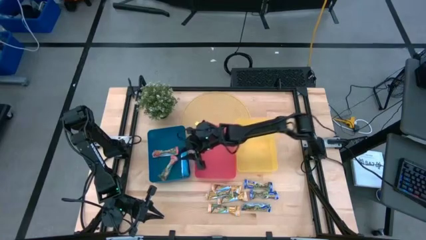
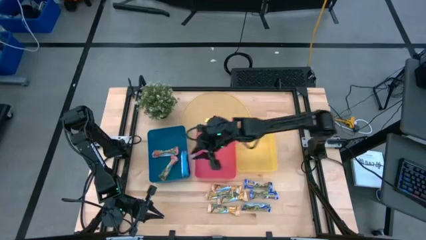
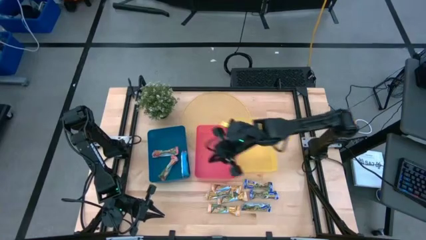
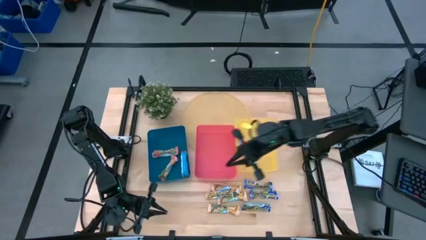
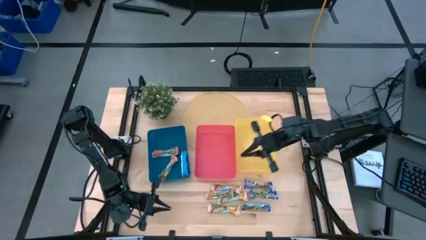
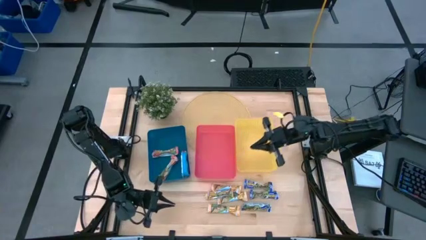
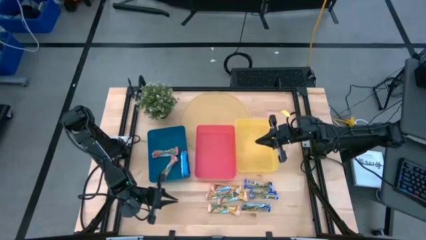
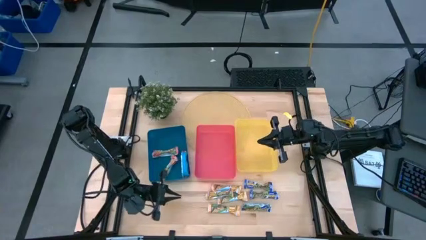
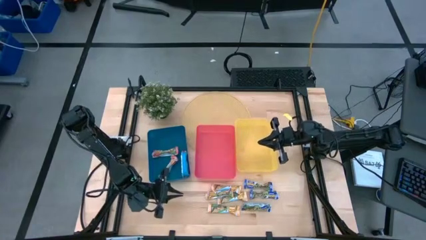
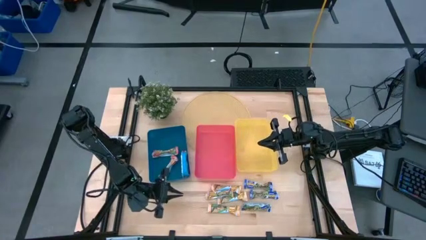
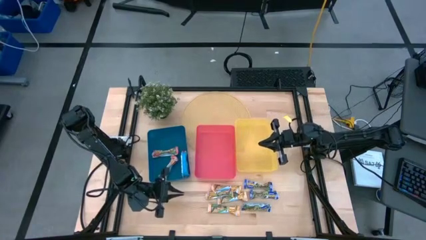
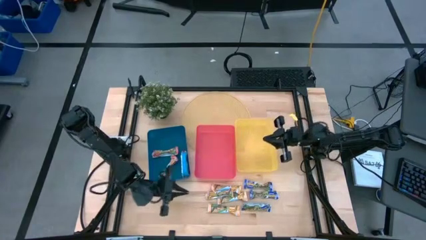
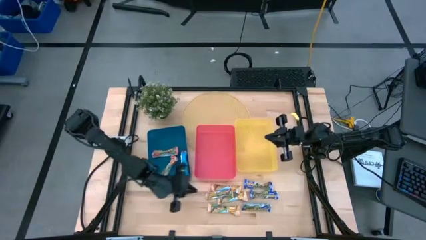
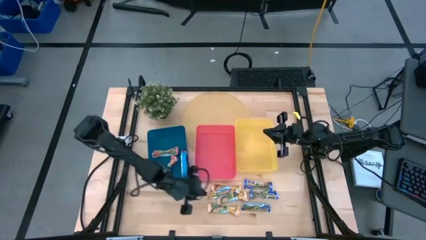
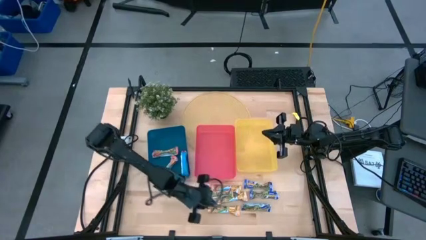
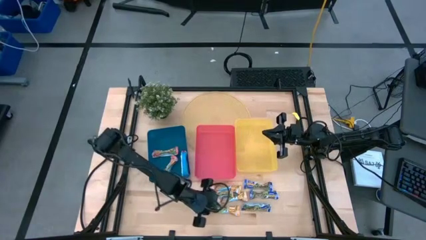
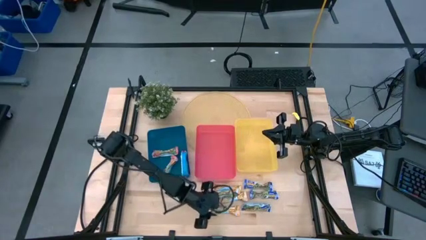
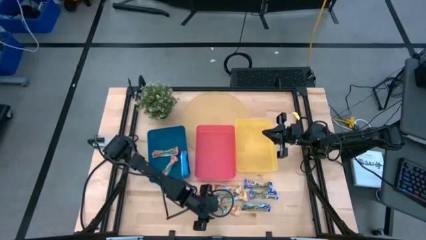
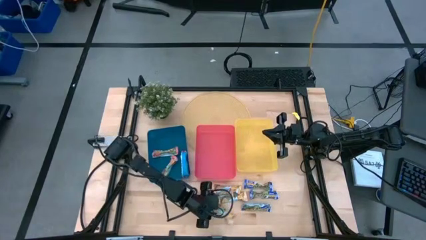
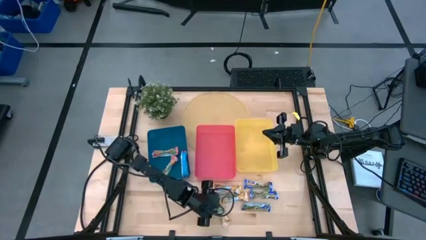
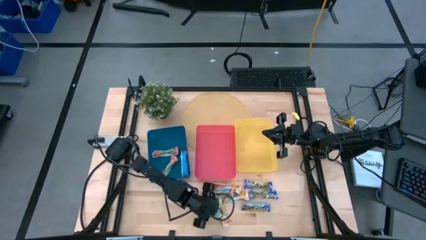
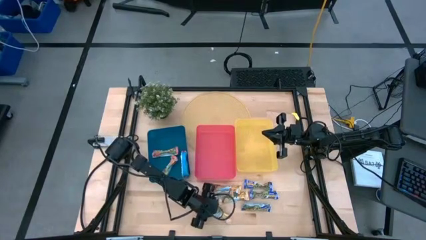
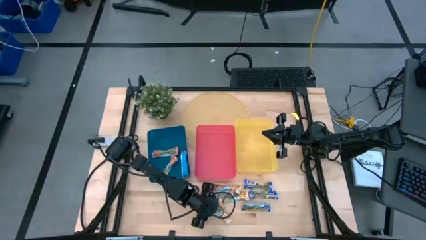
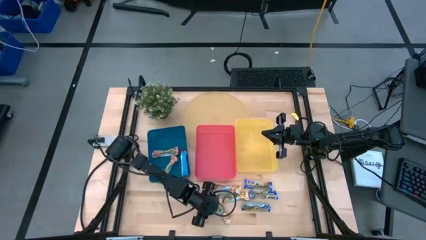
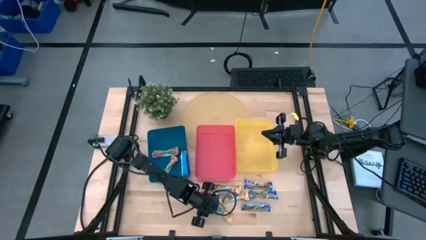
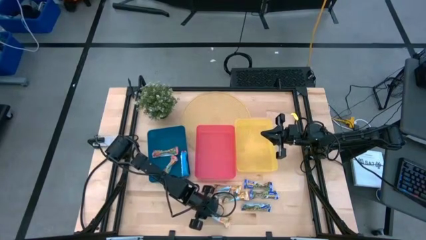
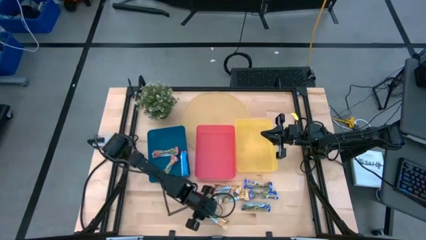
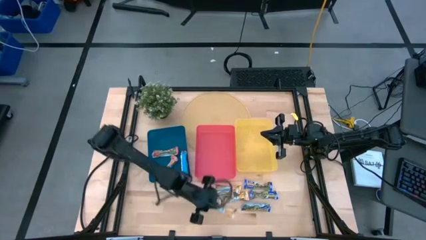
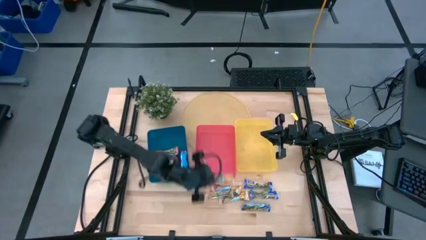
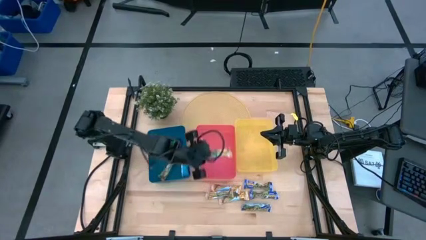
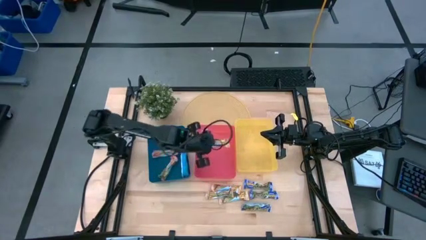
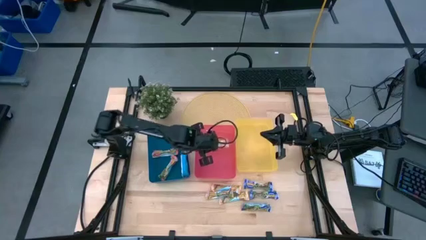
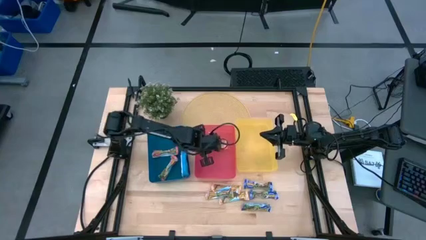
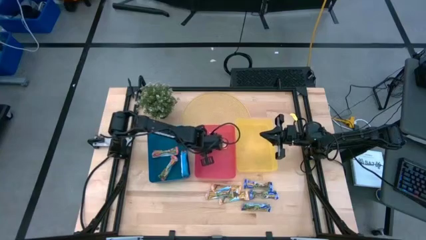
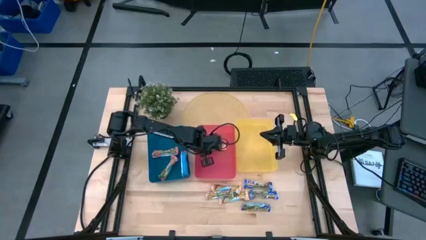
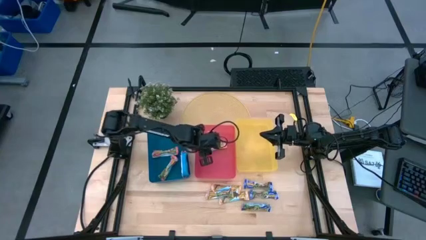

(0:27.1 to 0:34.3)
Task: Pick and place Granola Bars by type
Put the yellow granola bar into the pink bin

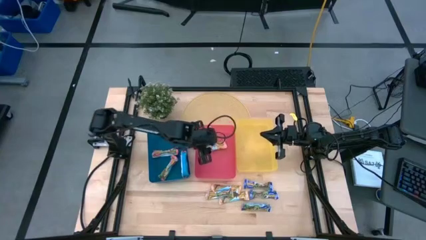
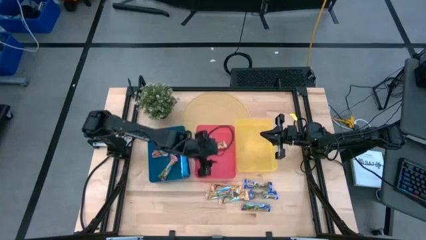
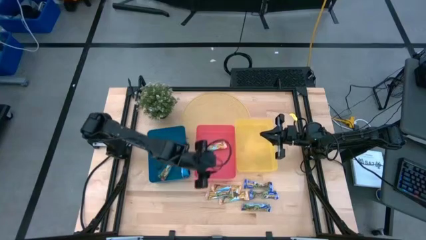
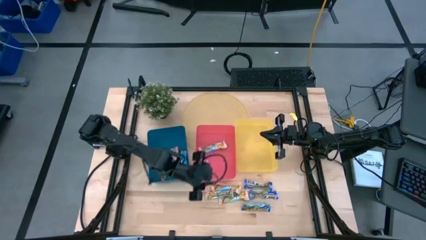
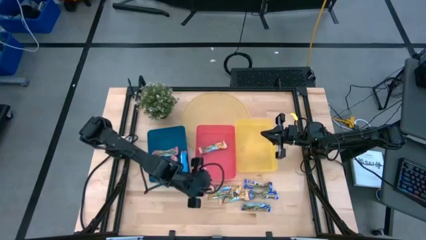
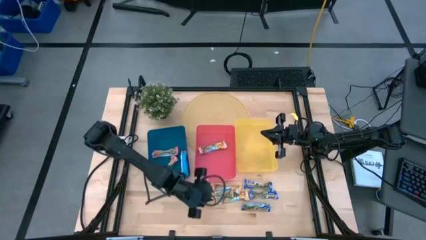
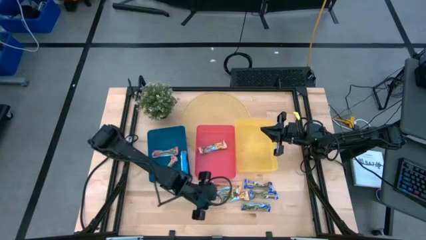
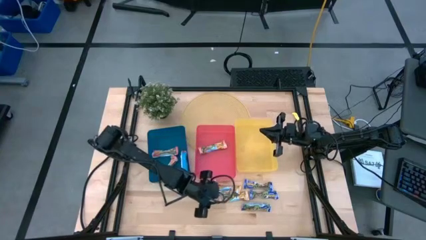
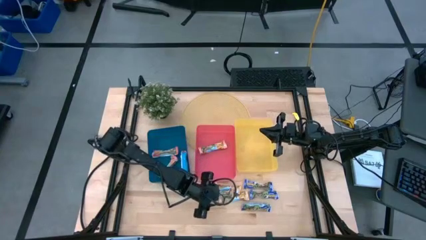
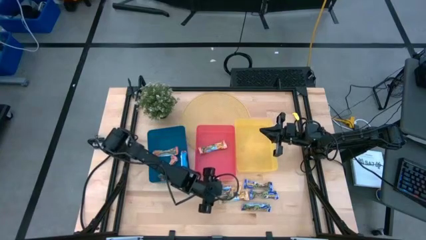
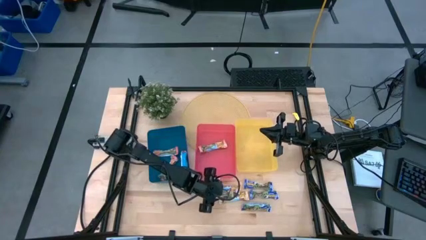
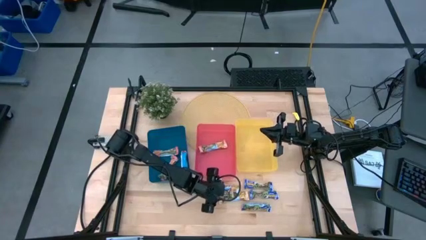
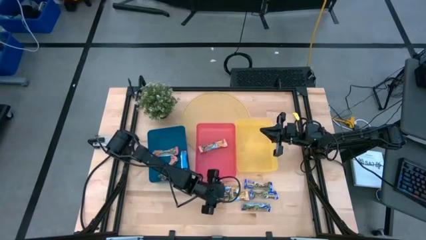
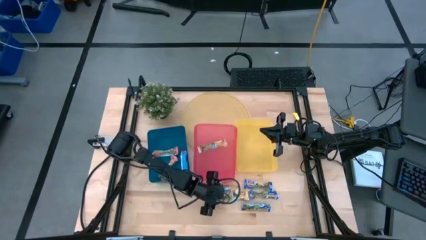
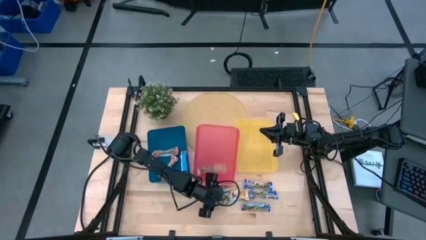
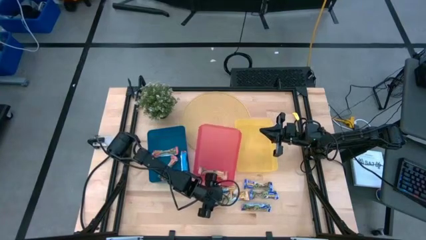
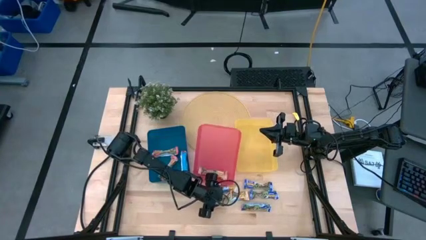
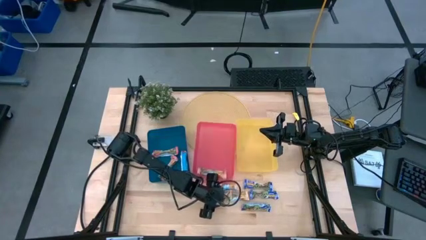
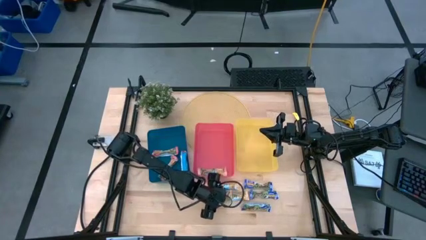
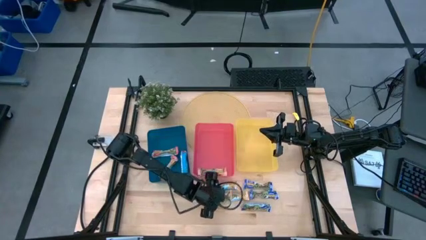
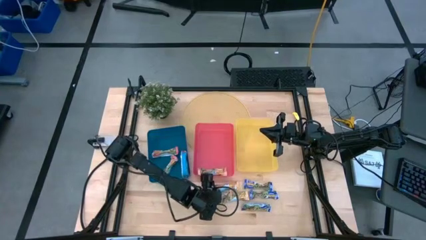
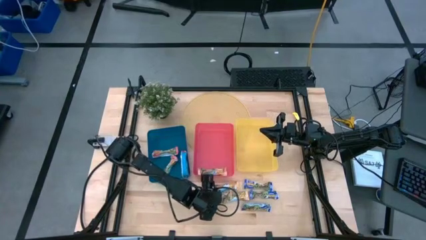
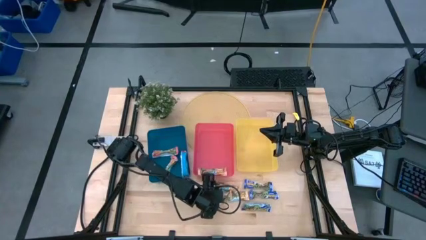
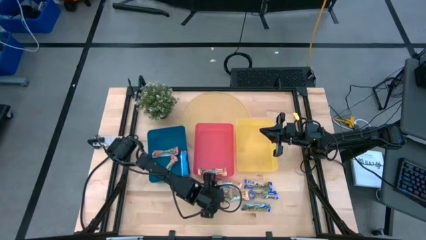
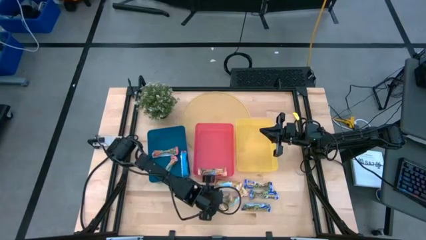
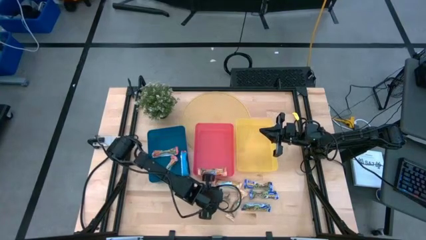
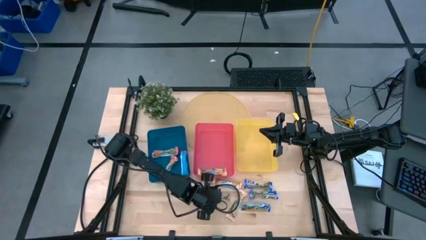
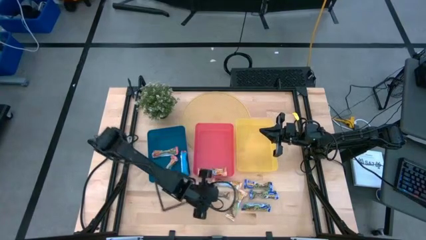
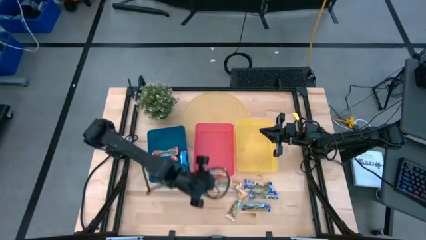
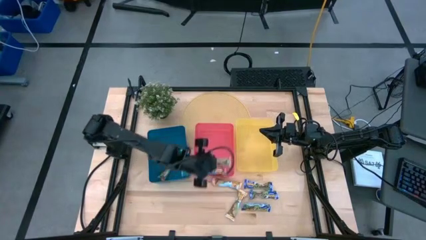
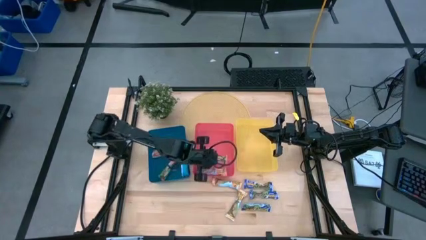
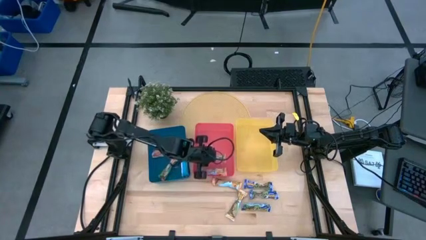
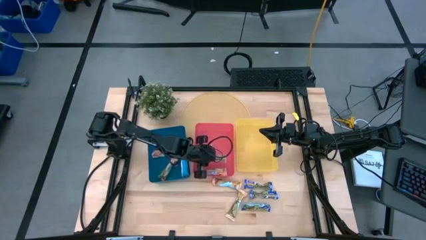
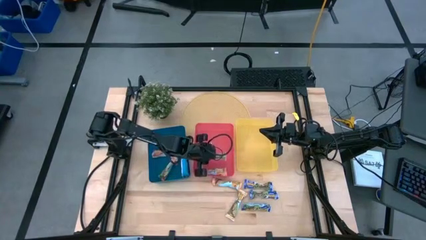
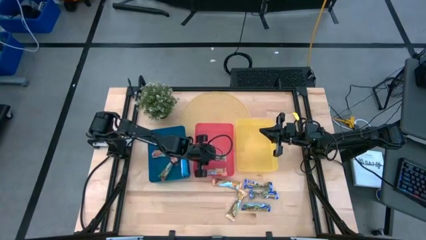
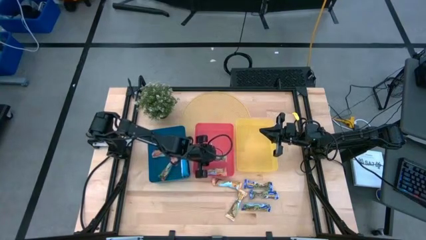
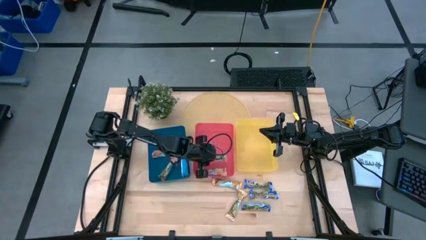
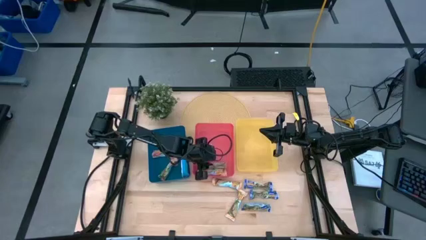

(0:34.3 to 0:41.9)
Put the yellow granola bar into the pink bin

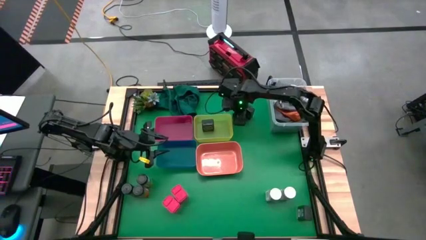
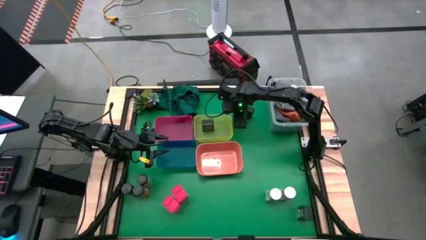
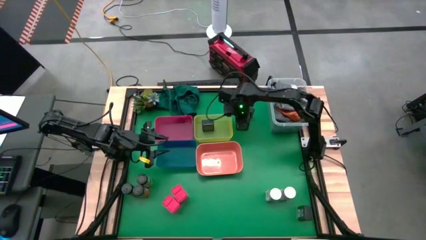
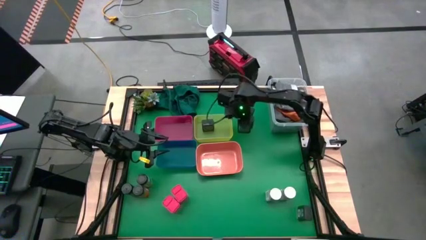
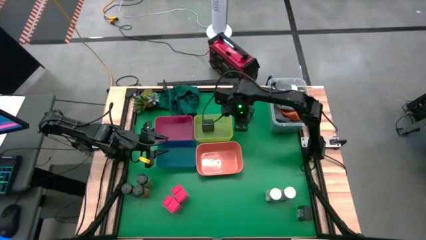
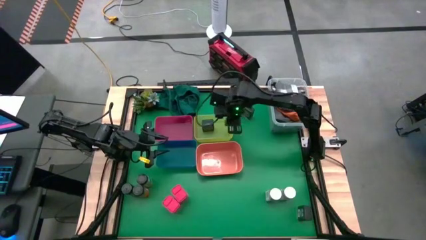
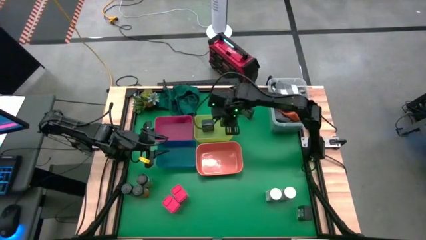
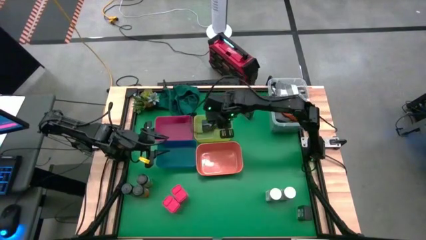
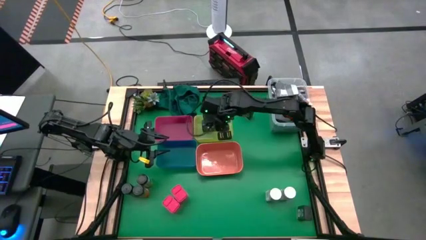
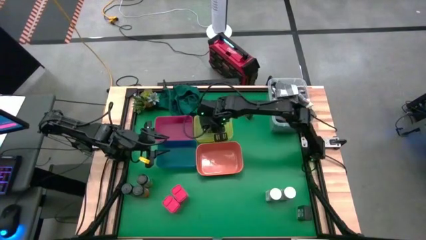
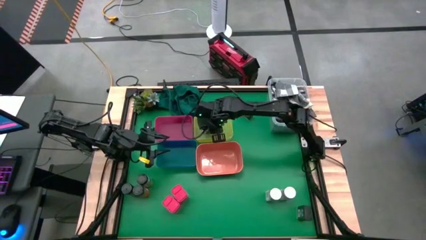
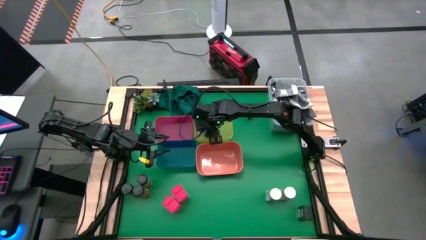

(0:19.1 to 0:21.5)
Task: Sort spices by type
Put the top left black seasoning can into the yellow bin
